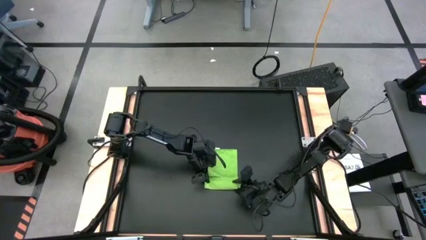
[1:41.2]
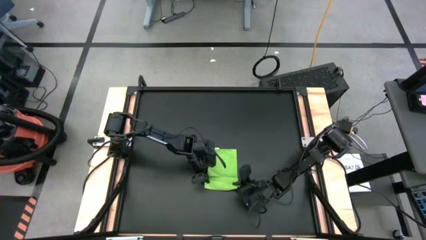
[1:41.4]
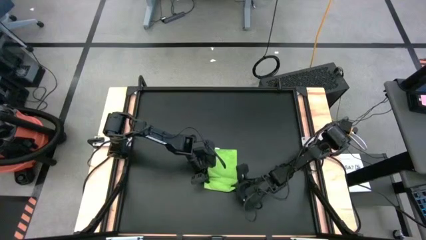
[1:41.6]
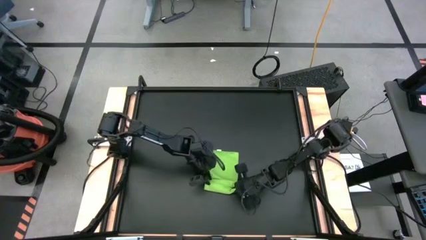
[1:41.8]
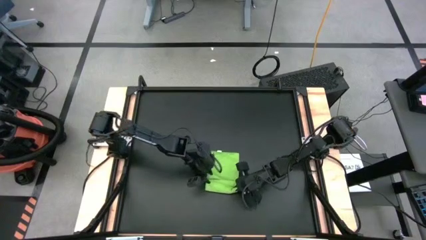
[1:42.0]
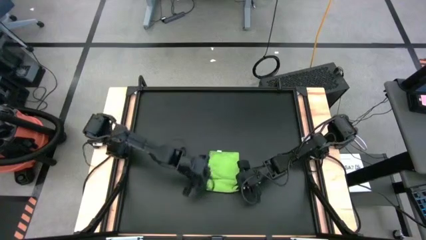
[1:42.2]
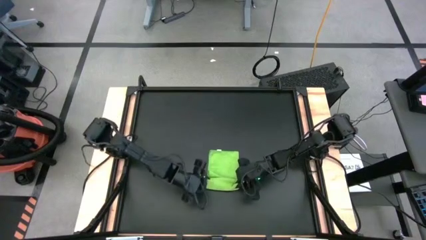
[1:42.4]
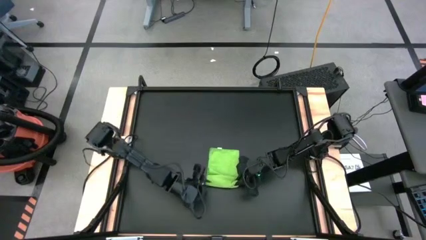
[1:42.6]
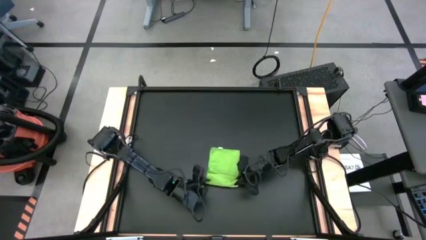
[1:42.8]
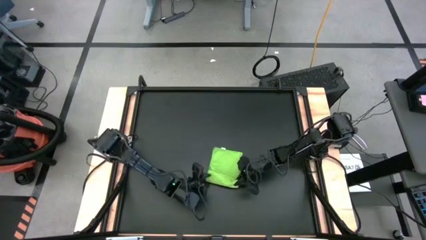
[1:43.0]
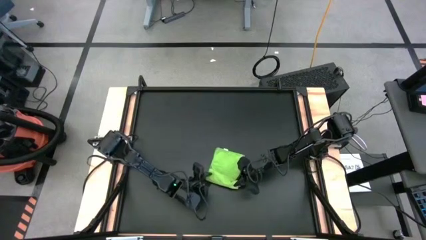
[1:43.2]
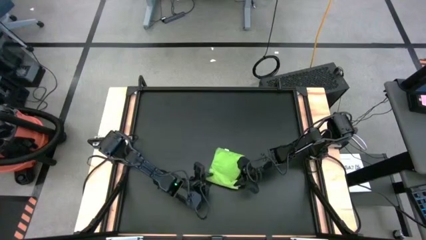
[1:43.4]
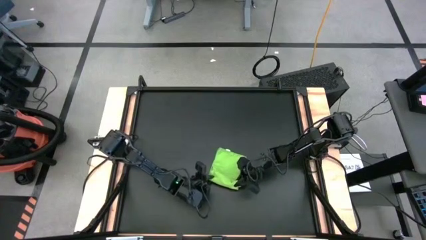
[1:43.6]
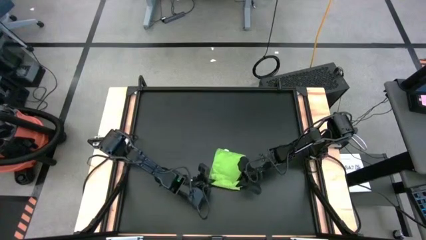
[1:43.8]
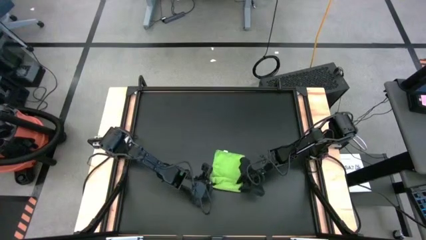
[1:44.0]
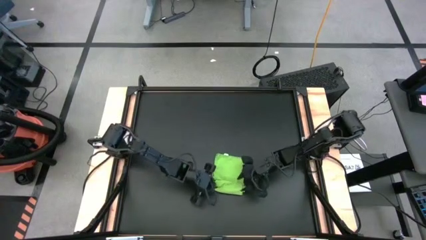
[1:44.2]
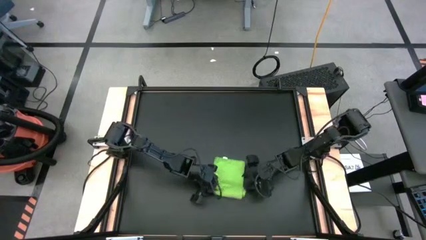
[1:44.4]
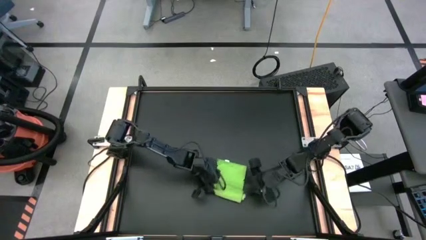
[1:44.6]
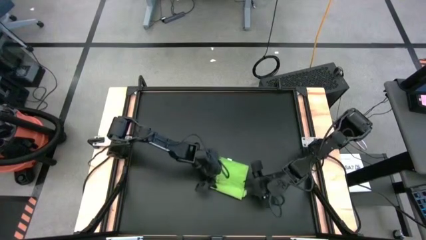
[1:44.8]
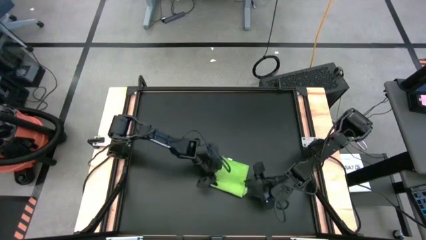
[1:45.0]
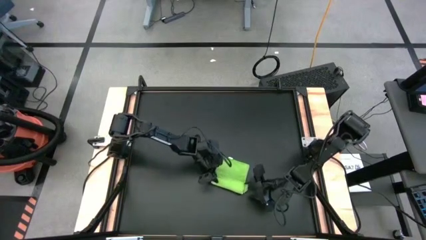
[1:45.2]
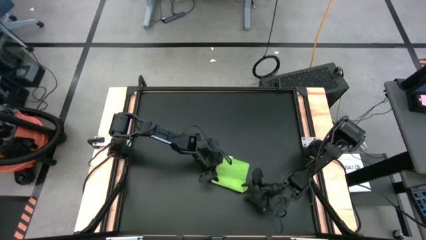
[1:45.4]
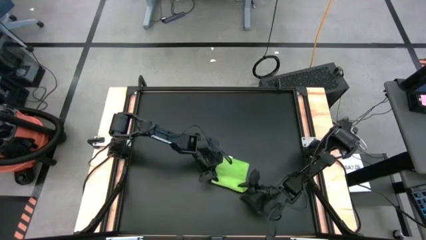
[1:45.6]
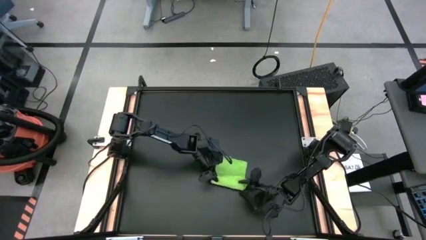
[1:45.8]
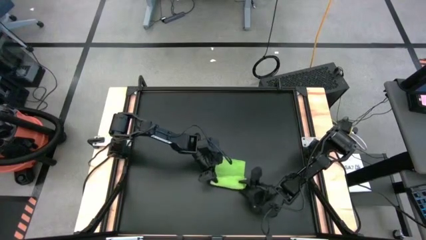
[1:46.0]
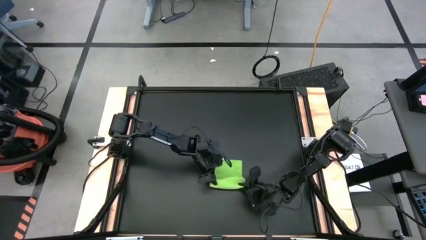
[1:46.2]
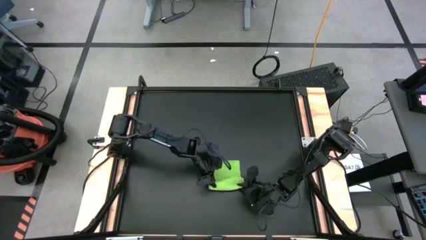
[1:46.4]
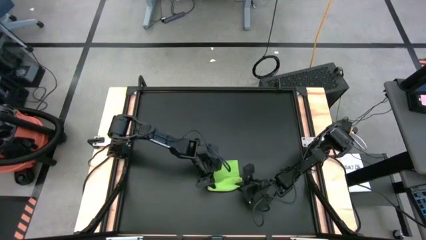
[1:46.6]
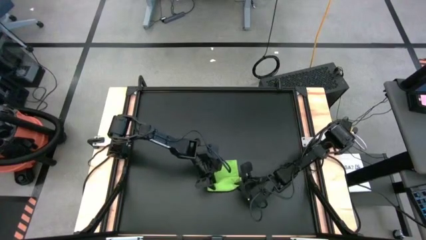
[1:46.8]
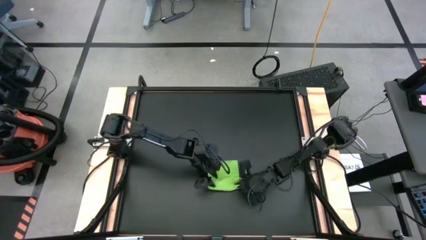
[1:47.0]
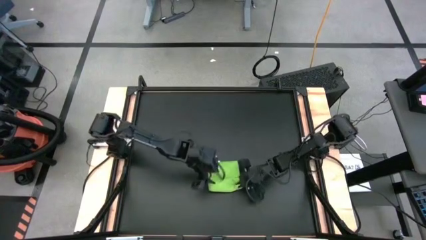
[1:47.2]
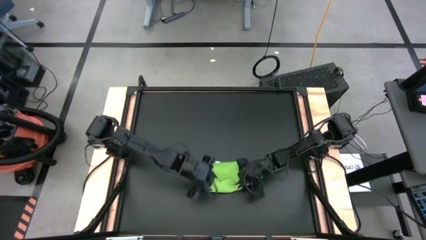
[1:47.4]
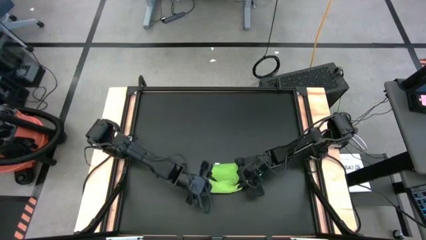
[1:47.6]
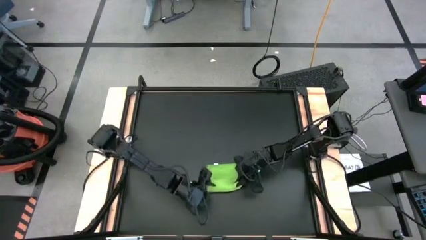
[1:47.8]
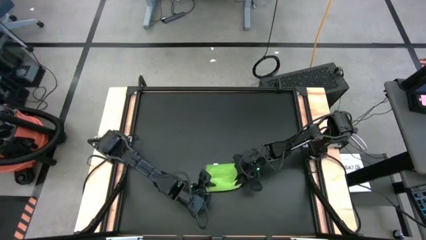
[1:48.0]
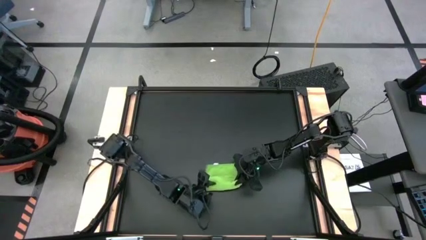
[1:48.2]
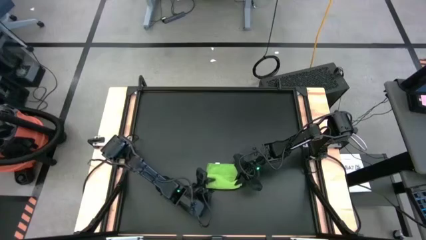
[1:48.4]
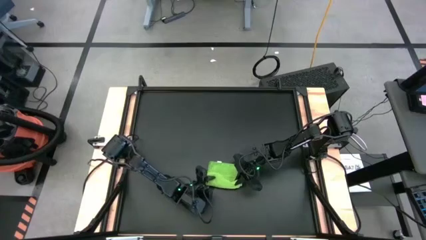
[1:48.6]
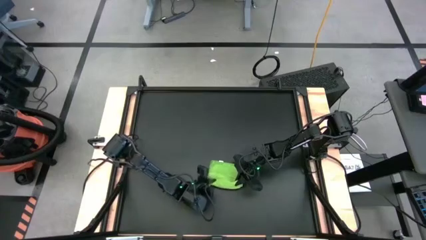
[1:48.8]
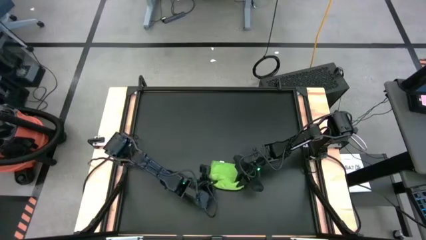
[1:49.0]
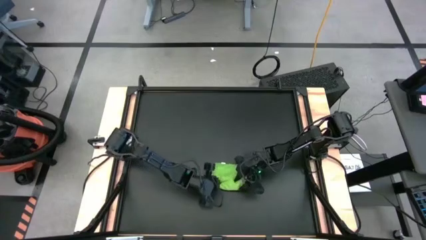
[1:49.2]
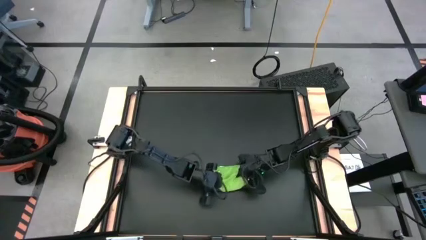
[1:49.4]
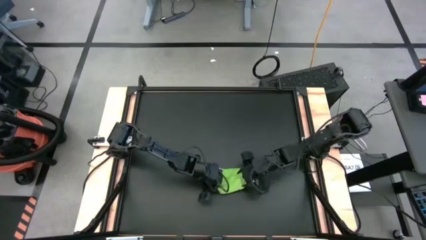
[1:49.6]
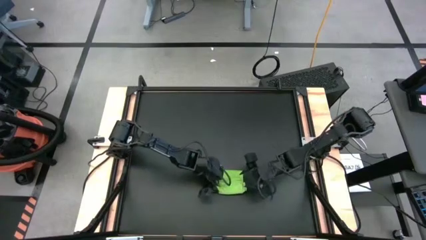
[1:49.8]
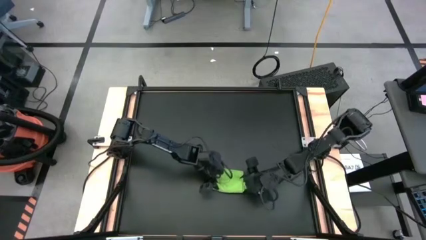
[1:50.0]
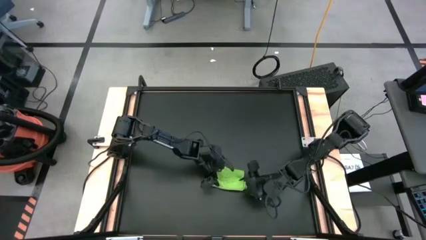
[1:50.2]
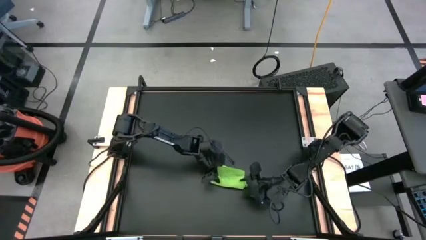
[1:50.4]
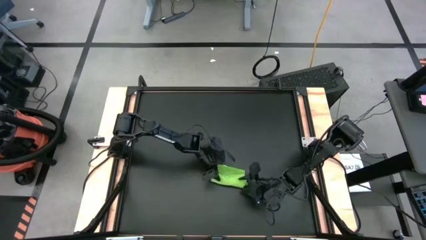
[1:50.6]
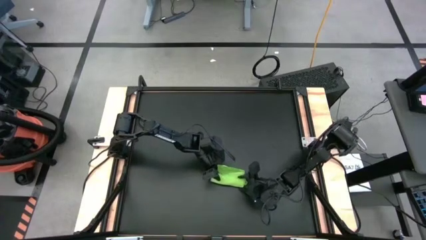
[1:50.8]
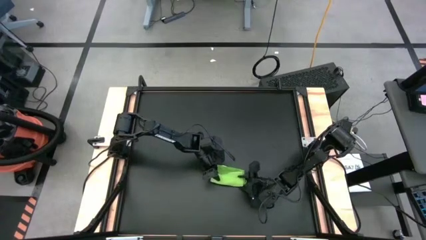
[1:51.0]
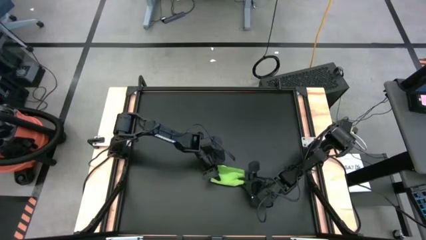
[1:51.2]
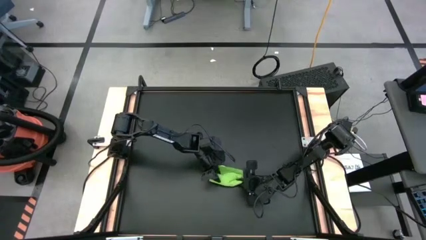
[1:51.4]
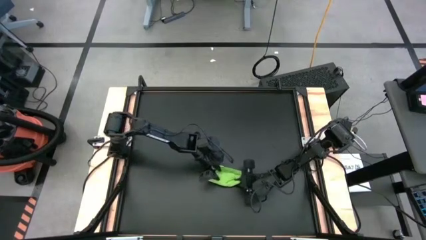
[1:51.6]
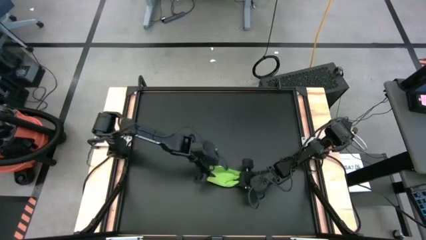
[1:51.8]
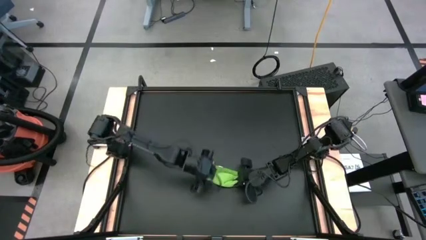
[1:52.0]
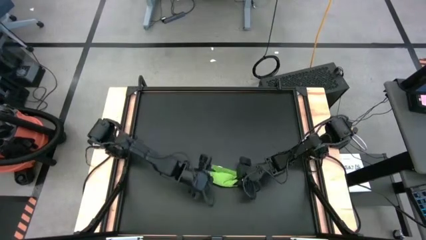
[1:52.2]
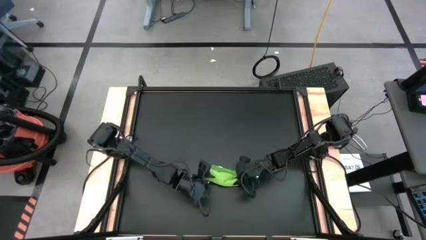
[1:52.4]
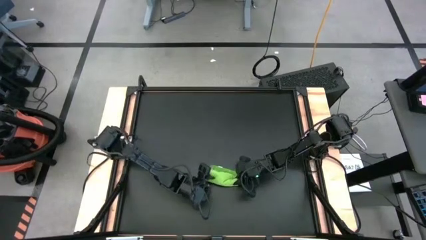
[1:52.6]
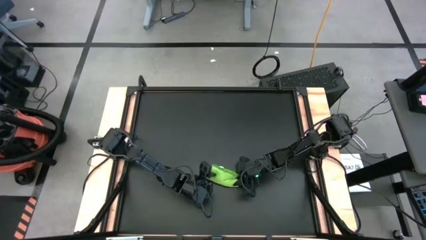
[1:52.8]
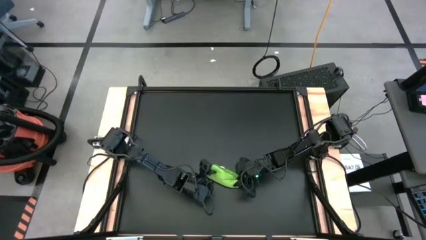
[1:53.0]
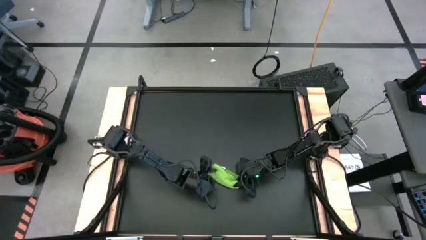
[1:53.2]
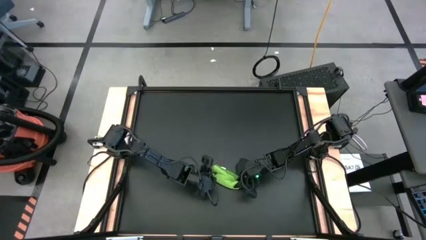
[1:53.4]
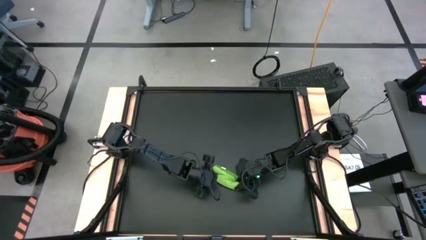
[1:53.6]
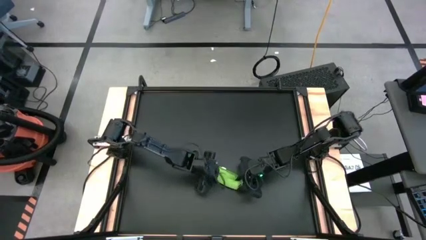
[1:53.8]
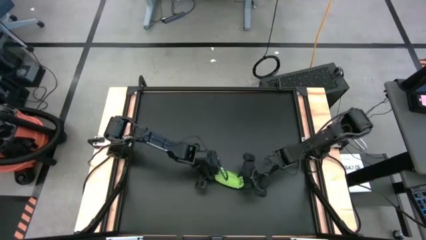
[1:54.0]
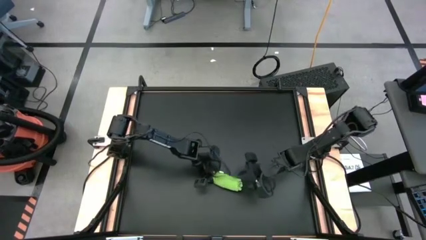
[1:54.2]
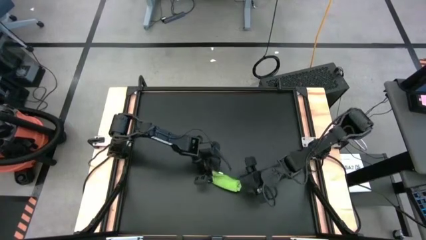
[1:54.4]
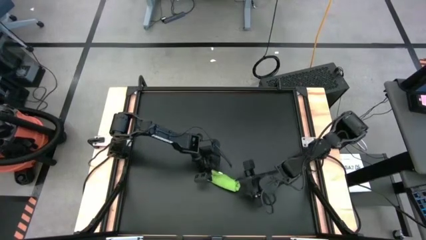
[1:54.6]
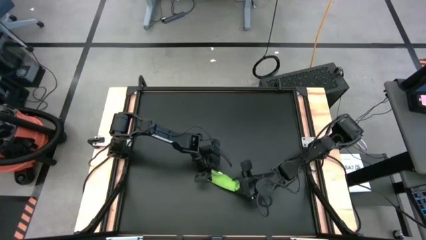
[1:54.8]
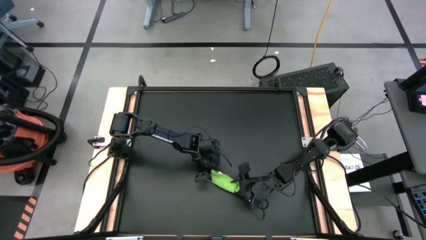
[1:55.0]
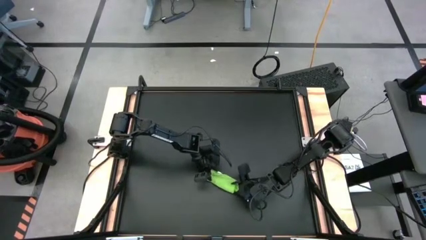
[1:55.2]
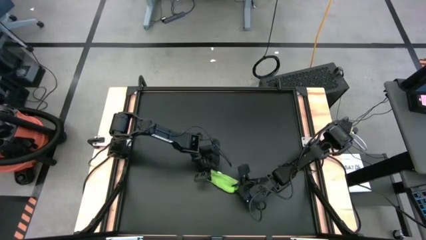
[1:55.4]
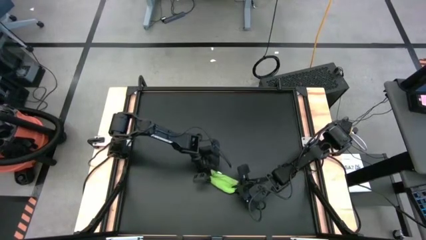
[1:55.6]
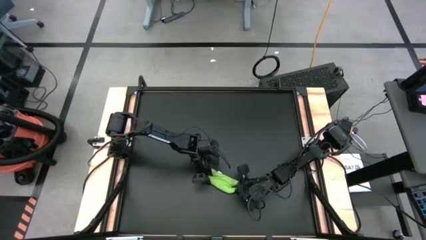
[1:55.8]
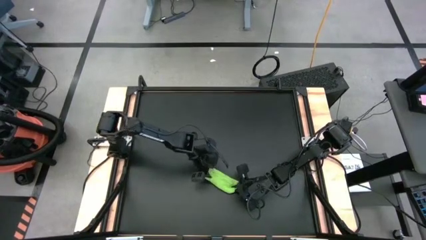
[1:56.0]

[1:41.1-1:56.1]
Task: Roll towel into tight, uniform cylinder
Roll the green towel

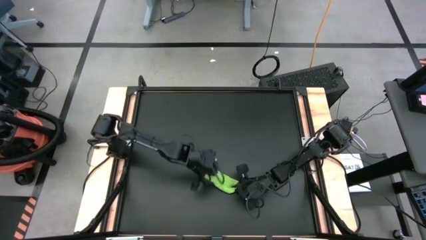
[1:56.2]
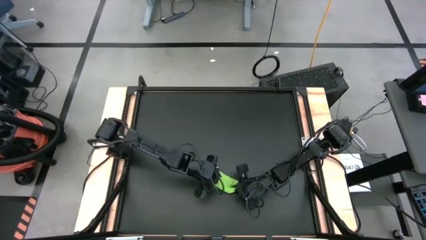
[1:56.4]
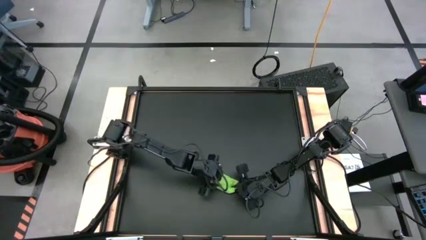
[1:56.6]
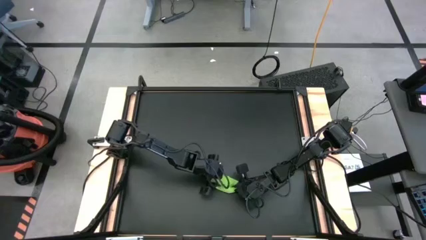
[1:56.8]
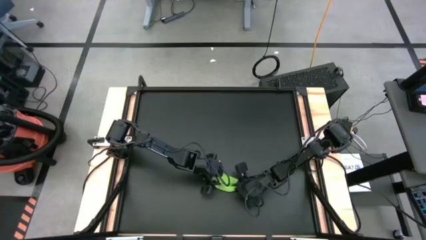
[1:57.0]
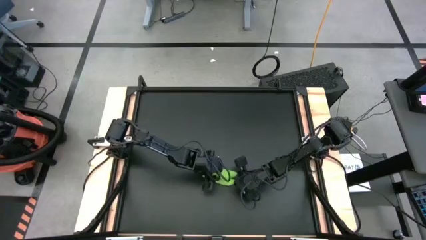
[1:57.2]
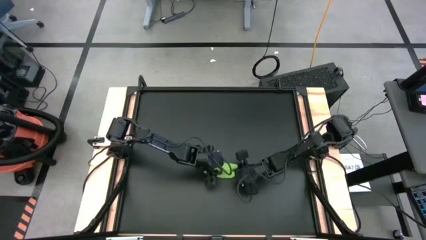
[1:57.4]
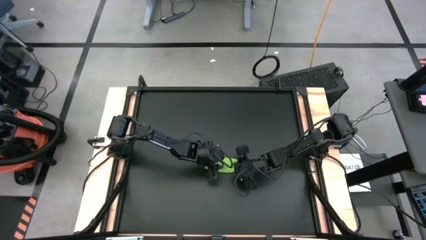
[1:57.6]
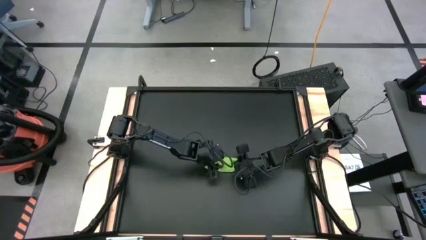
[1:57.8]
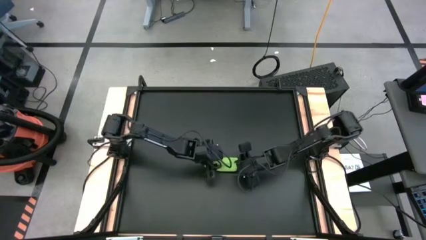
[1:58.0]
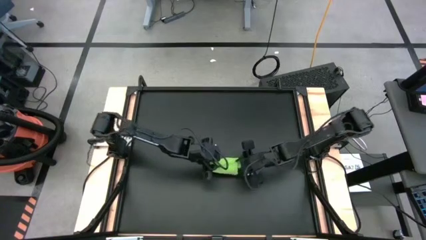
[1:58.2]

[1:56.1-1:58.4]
Roll the green towel
